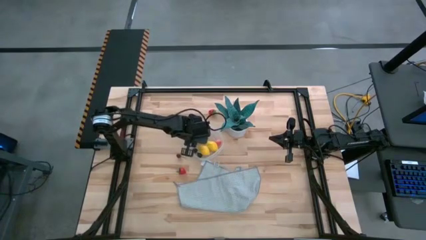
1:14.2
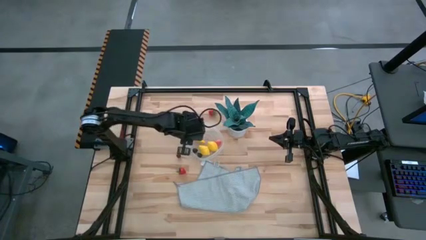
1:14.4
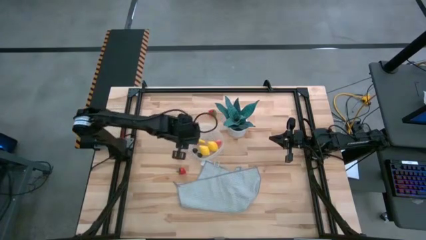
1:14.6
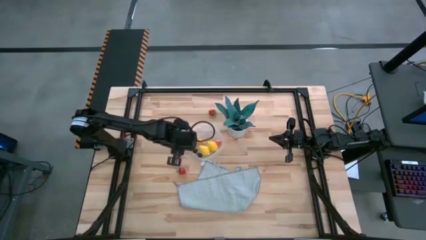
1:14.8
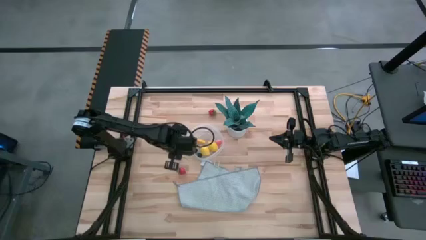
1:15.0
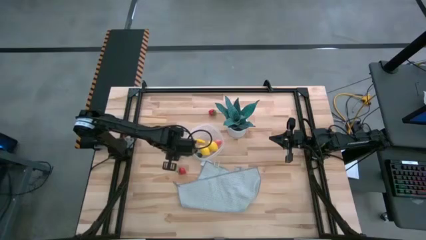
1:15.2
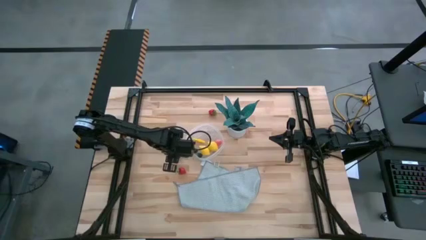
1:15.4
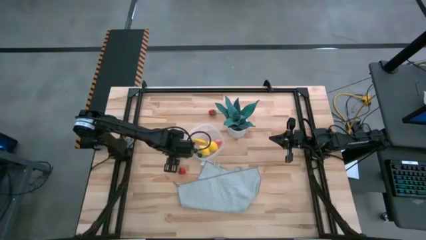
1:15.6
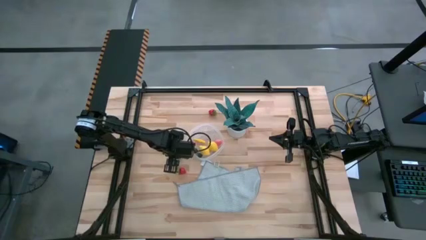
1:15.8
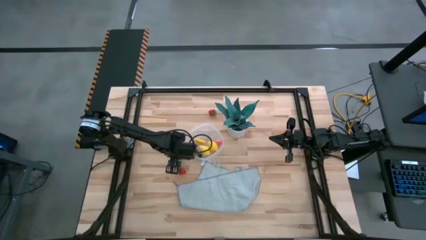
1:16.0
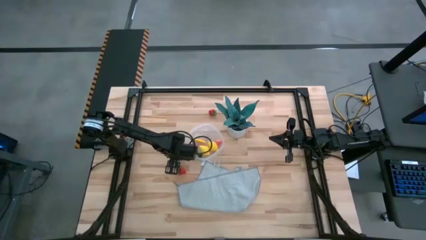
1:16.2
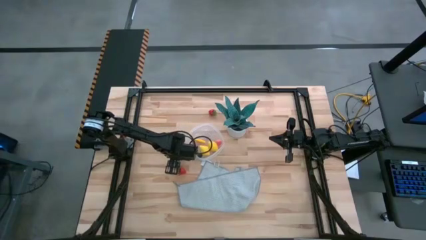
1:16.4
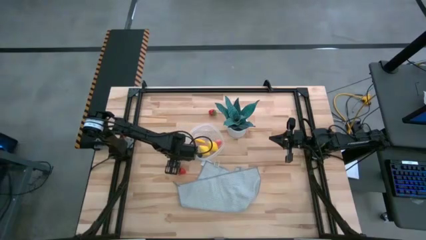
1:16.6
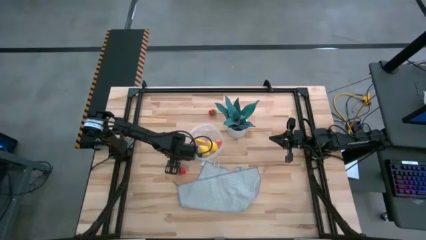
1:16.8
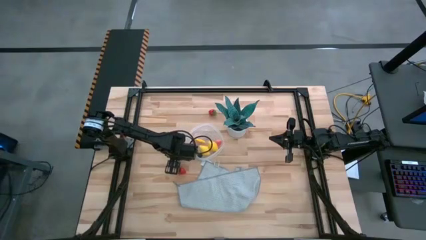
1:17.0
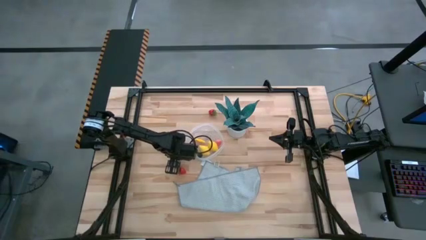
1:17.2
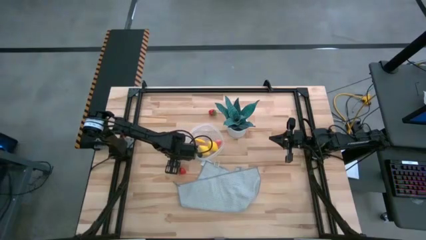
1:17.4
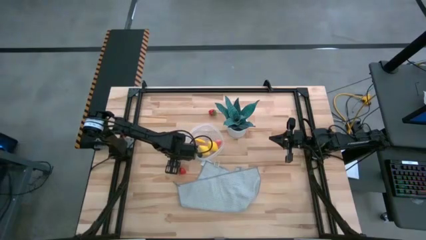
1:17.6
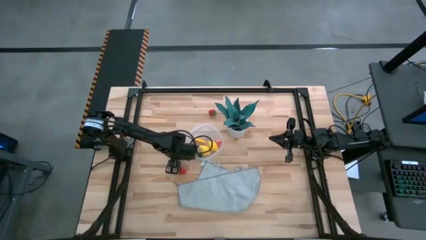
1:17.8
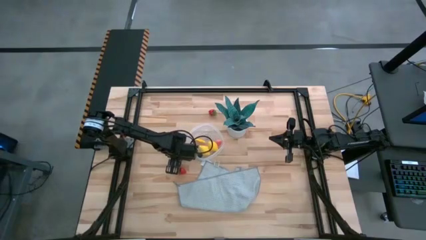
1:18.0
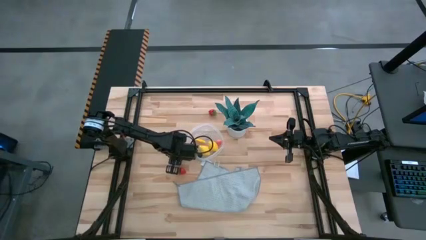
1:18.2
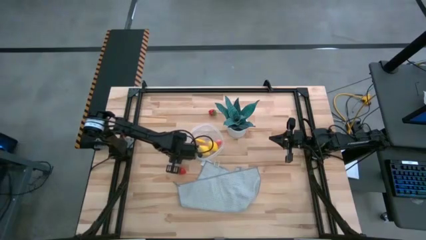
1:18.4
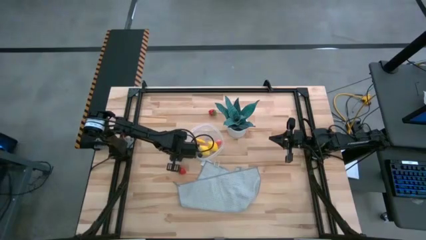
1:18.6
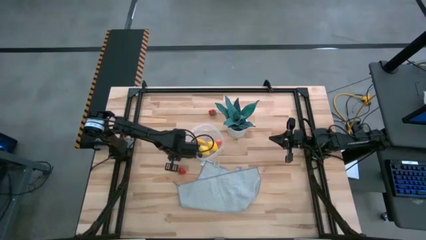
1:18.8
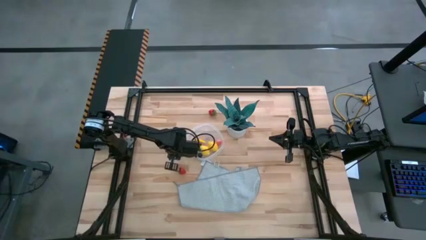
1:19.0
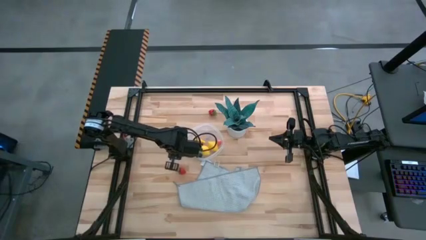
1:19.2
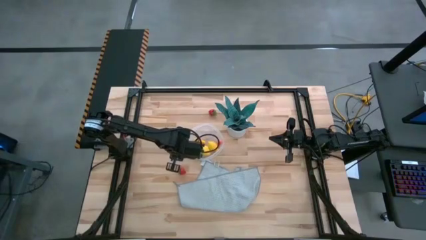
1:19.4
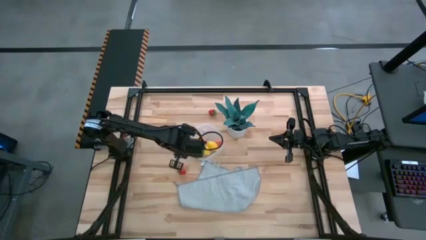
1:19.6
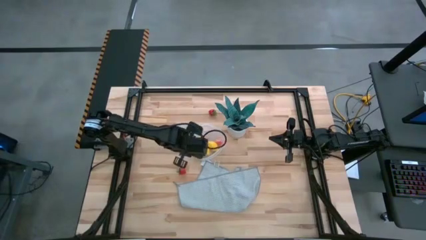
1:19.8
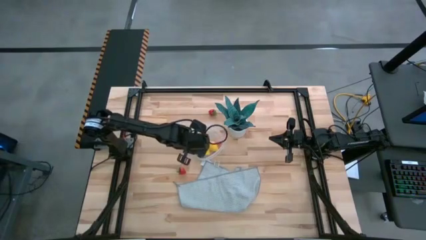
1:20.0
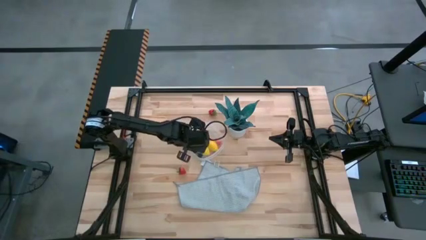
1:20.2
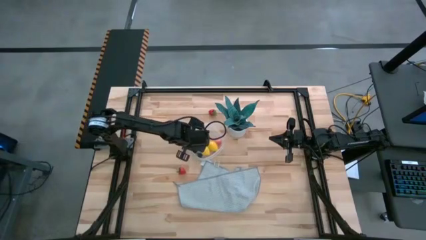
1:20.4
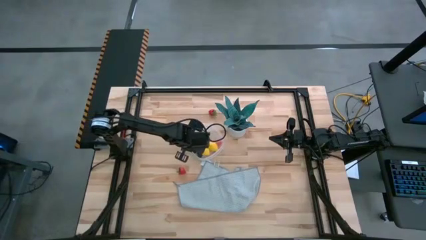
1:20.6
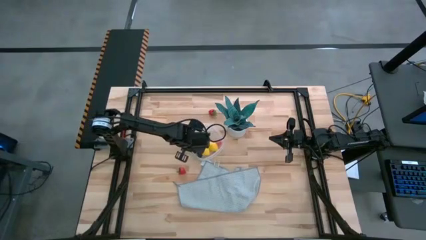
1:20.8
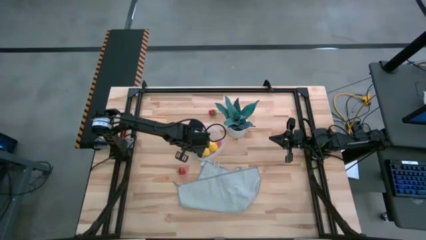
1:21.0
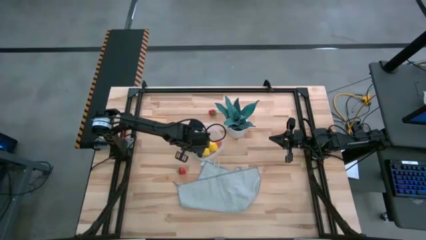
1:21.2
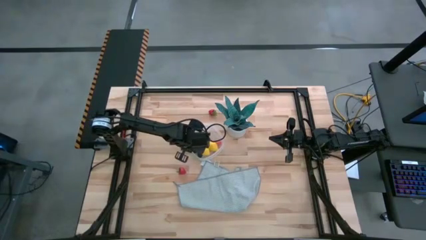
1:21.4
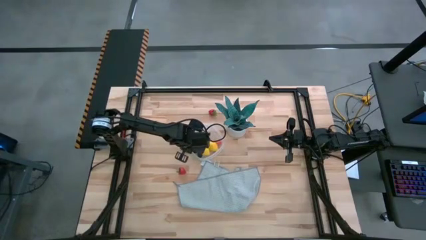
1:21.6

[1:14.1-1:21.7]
Task: Pick and placing Produce into tupperware
Put the red cherry into the container

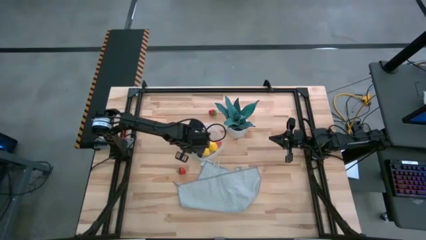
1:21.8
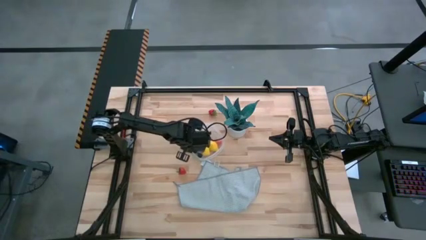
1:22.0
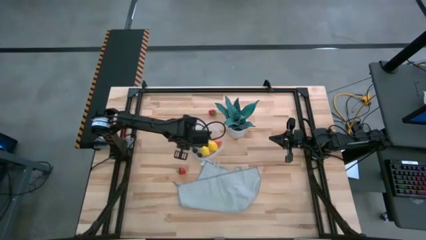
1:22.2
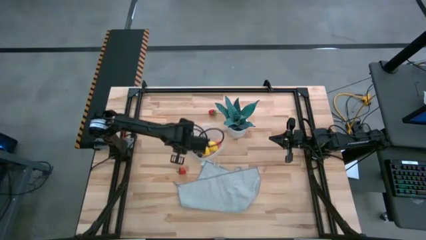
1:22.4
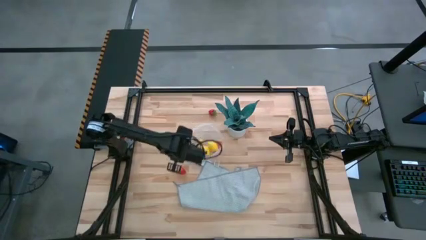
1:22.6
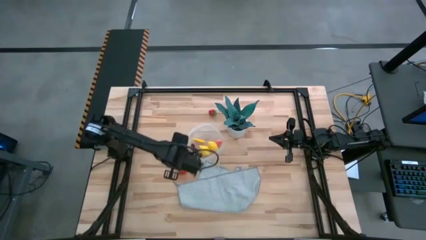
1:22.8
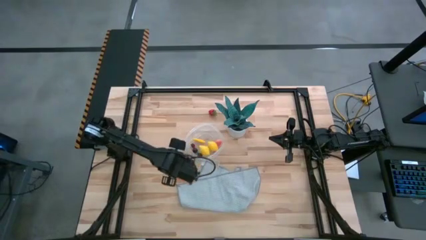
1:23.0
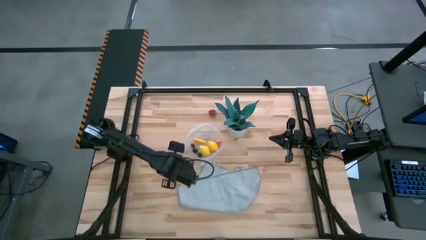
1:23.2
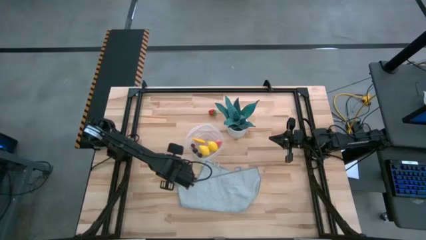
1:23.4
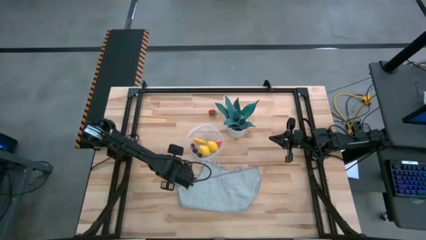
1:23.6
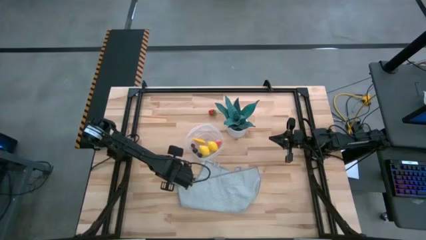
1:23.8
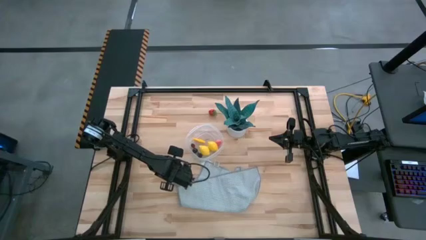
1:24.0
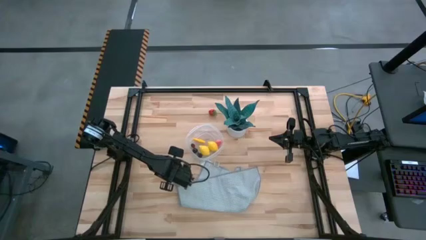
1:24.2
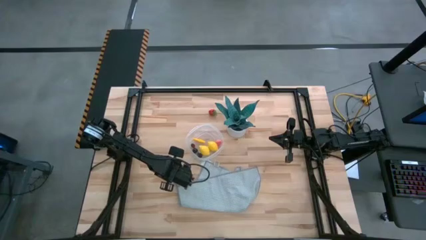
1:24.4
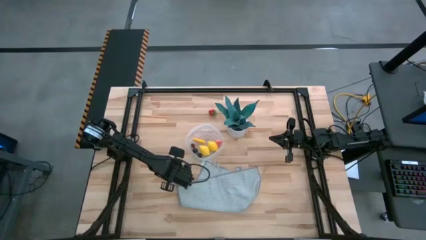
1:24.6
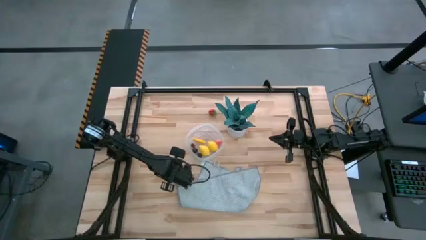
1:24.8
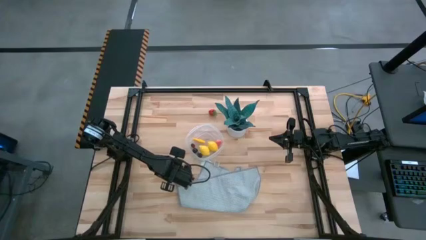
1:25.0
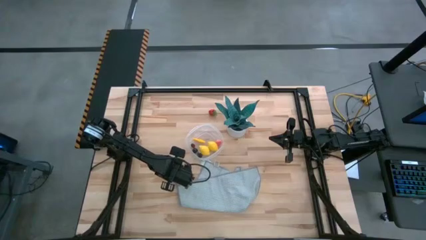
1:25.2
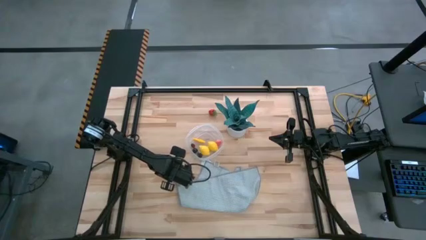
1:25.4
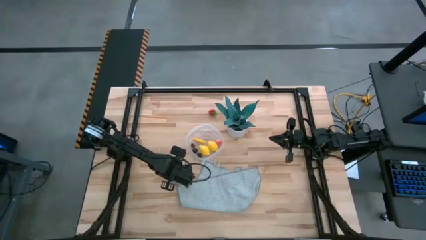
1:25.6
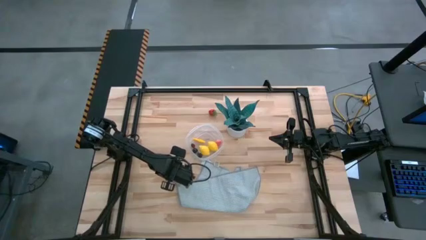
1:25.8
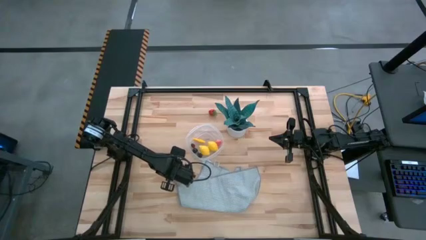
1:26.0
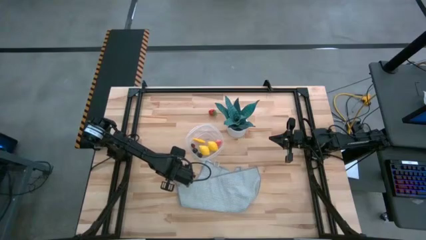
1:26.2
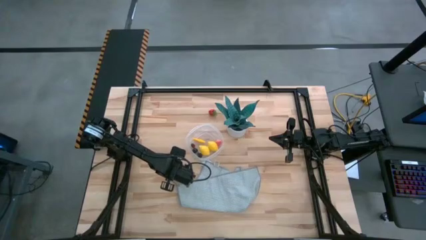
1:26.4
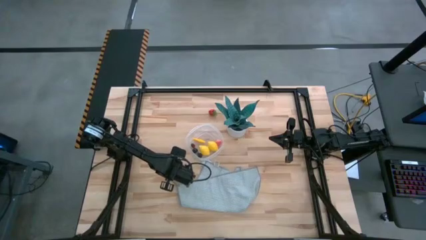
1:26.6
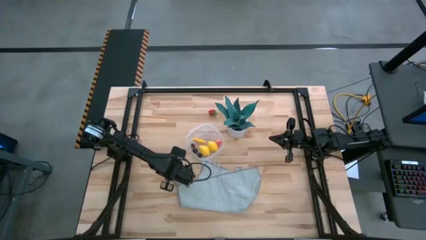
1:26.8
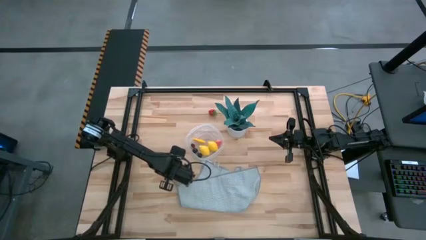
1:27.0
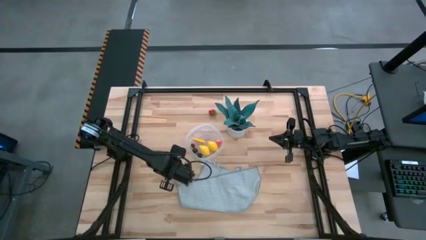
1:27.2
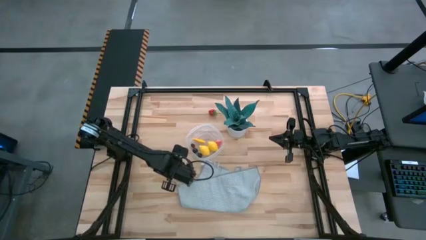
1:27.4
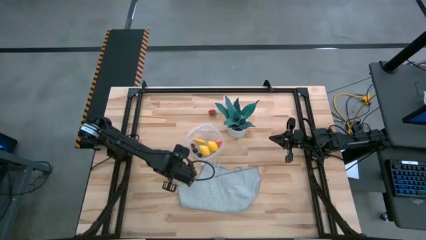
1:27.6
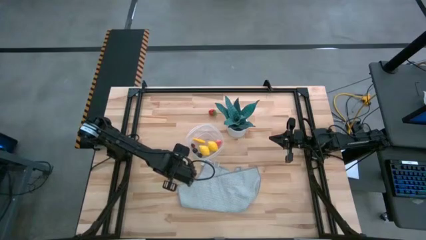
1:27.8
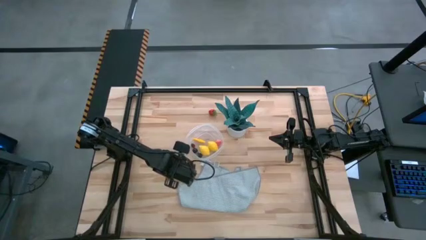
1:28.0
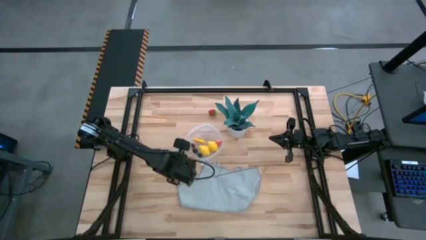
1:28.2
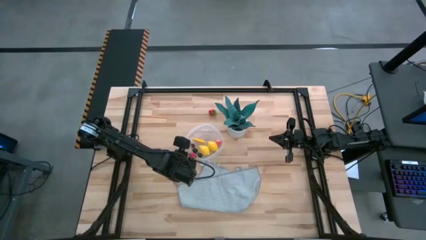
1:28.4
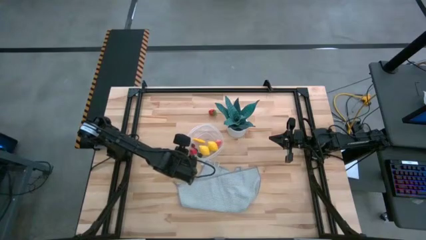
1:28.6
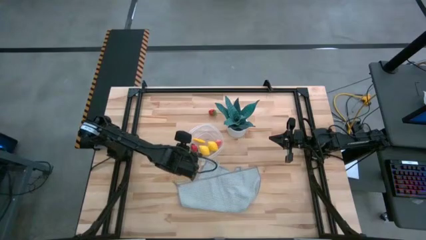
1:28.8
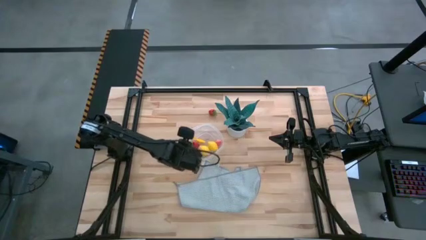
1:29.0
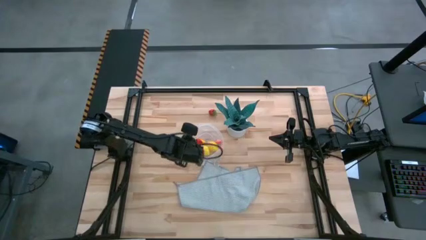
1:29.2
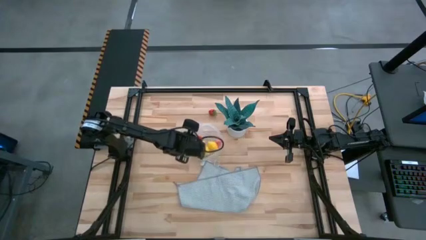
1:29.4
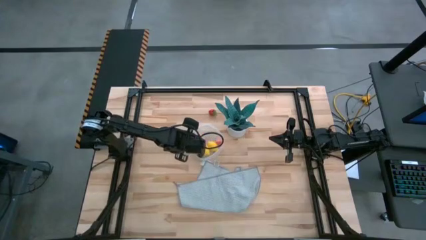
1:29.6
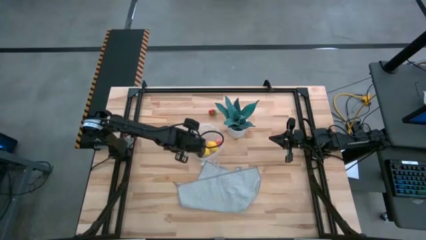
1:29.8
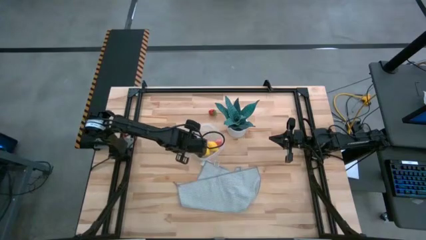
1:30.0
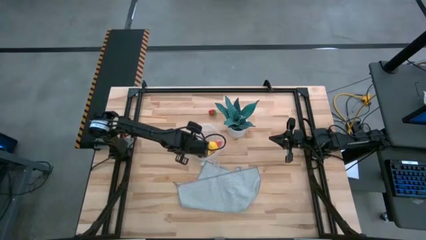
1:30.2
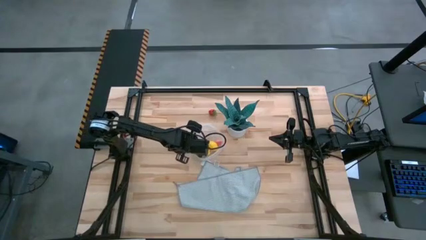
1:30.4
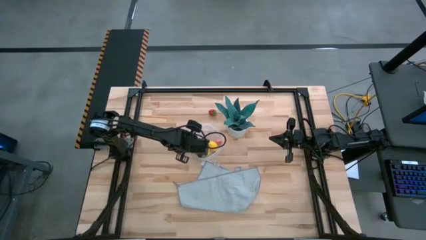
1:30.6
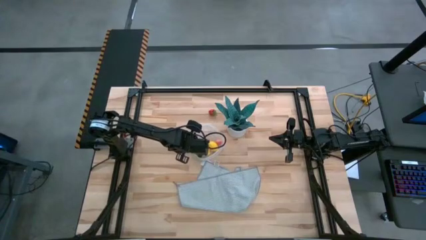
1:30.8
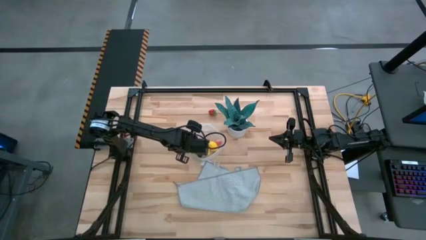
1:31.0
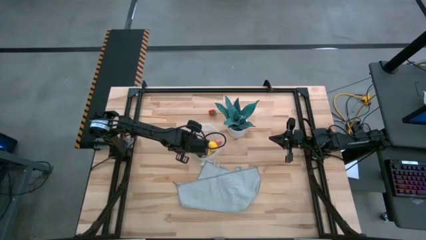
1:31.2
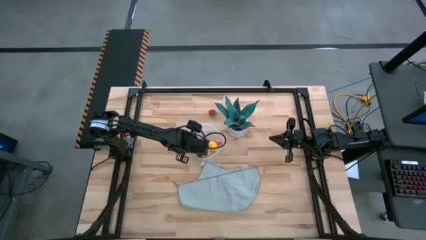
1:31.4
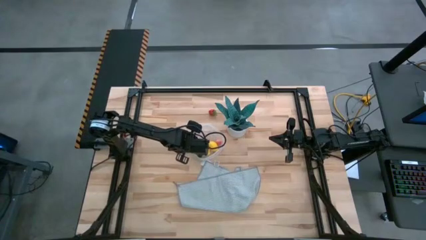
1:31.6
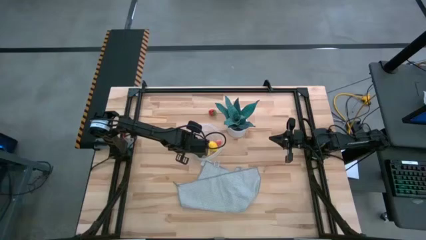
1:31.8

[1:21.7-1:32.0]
Put the bottom red strawberry into the container
